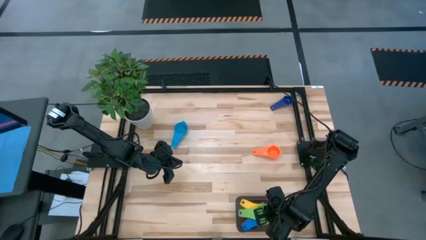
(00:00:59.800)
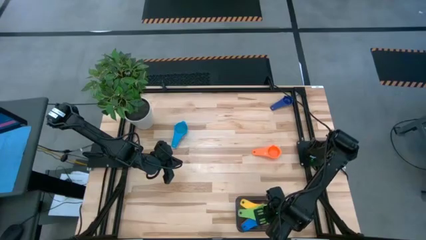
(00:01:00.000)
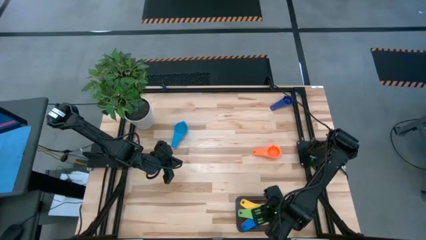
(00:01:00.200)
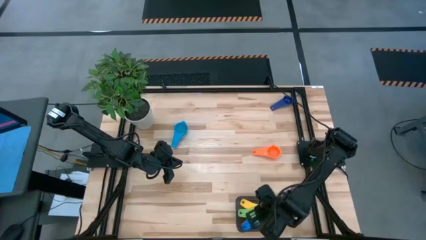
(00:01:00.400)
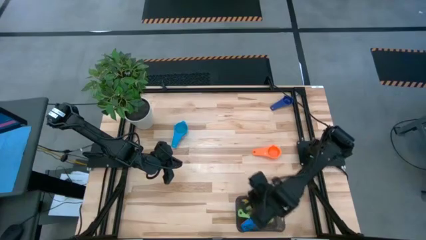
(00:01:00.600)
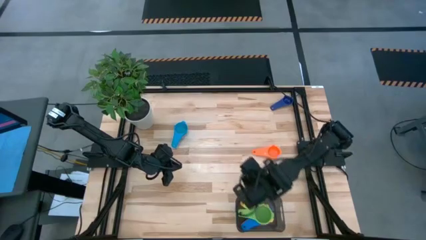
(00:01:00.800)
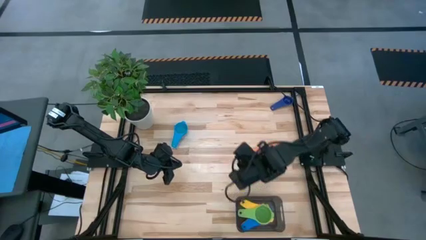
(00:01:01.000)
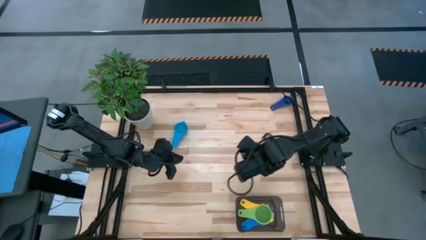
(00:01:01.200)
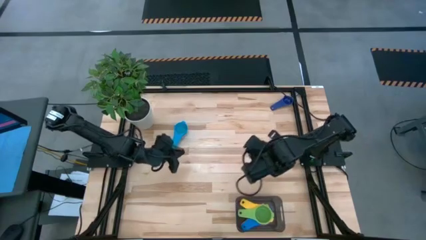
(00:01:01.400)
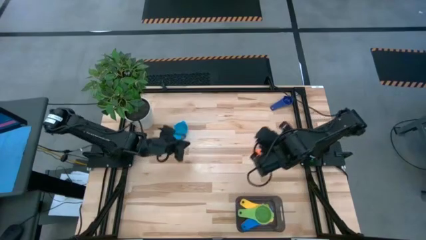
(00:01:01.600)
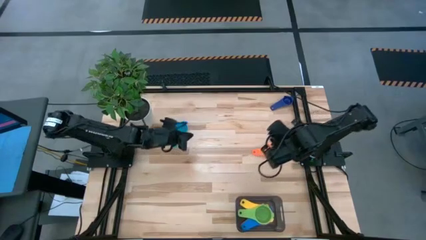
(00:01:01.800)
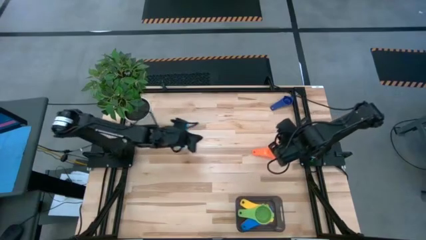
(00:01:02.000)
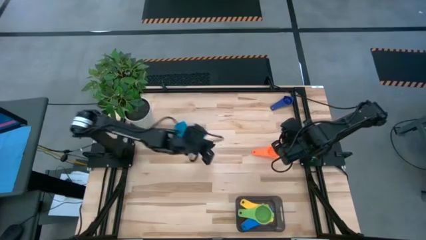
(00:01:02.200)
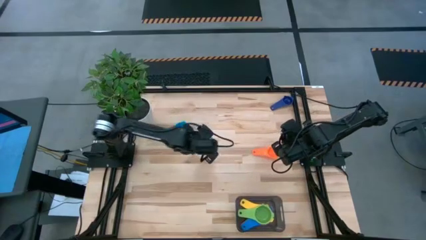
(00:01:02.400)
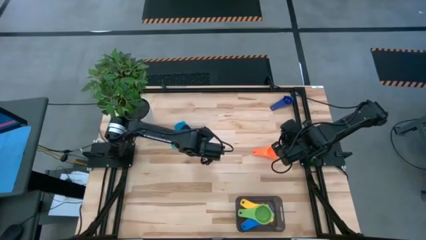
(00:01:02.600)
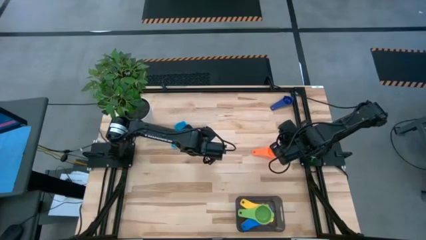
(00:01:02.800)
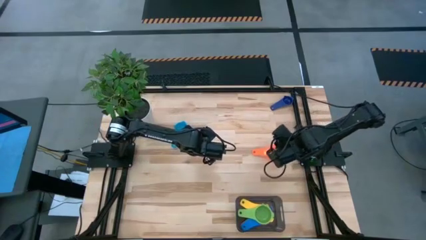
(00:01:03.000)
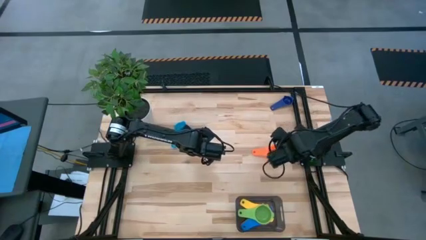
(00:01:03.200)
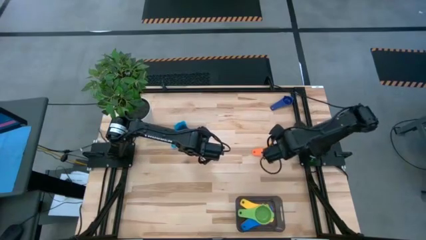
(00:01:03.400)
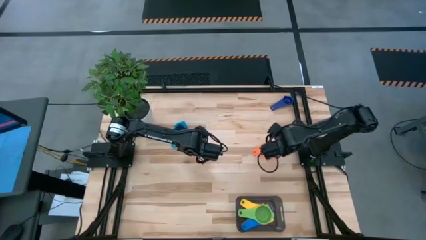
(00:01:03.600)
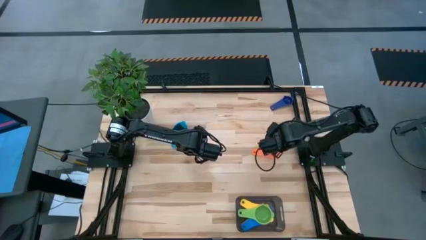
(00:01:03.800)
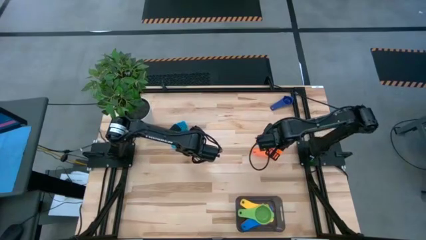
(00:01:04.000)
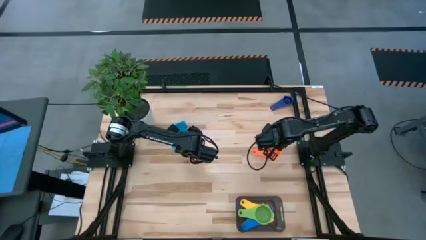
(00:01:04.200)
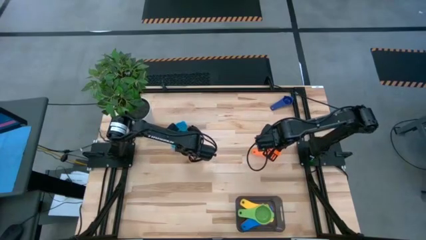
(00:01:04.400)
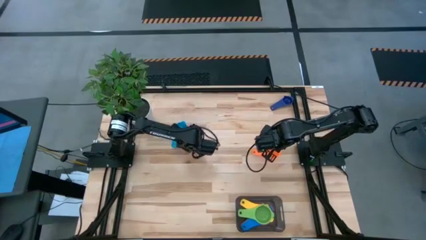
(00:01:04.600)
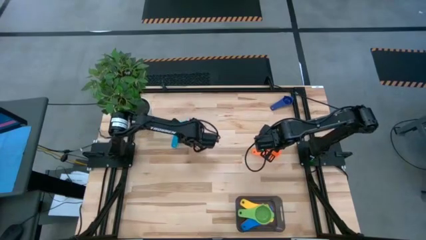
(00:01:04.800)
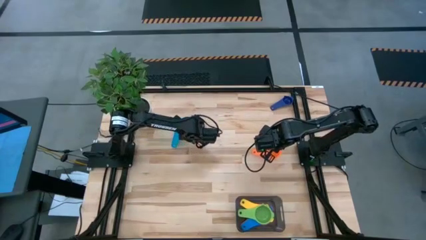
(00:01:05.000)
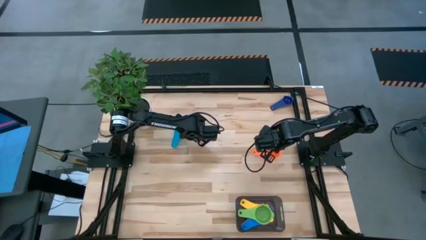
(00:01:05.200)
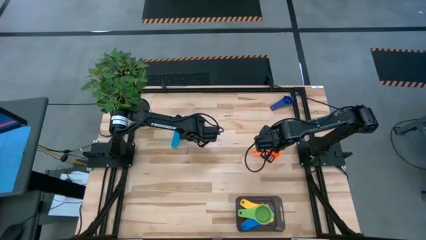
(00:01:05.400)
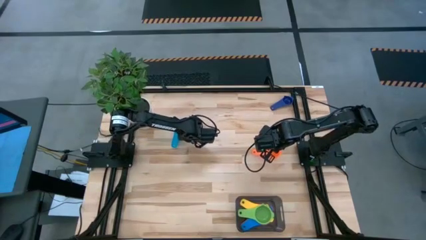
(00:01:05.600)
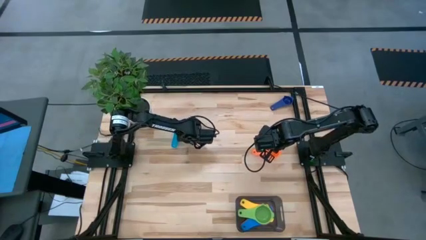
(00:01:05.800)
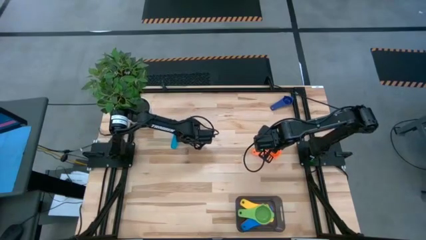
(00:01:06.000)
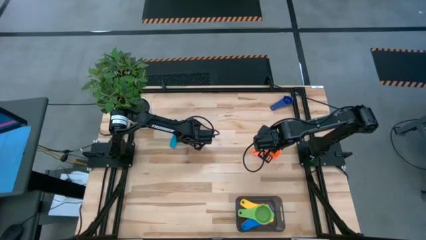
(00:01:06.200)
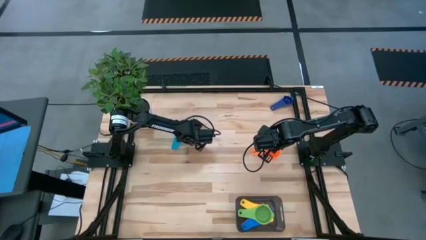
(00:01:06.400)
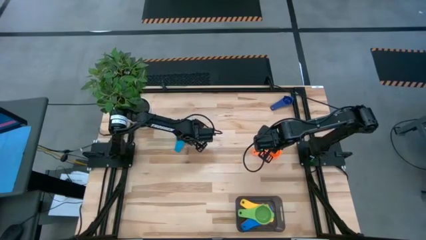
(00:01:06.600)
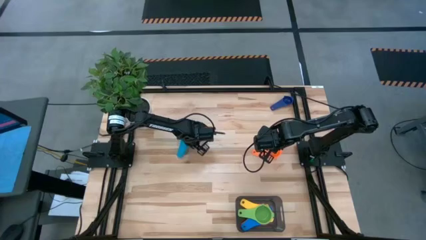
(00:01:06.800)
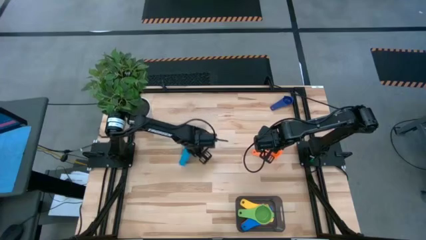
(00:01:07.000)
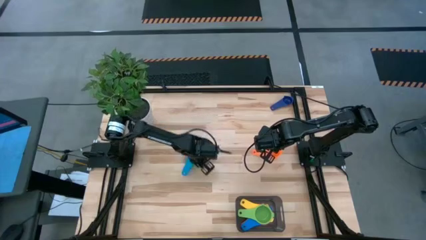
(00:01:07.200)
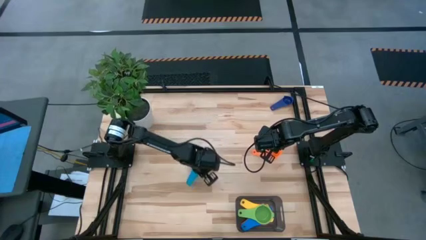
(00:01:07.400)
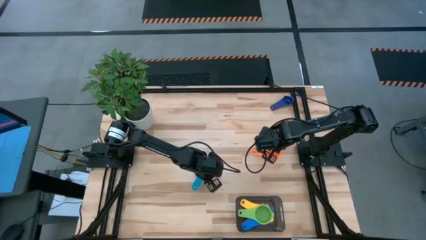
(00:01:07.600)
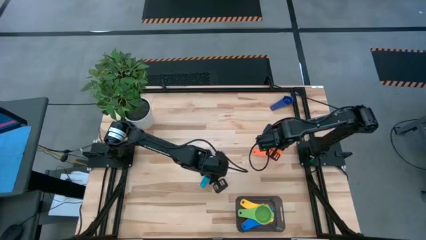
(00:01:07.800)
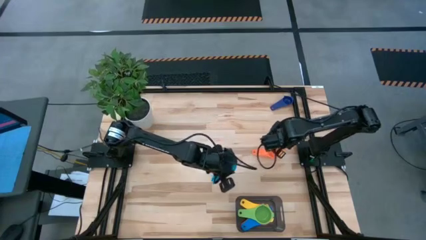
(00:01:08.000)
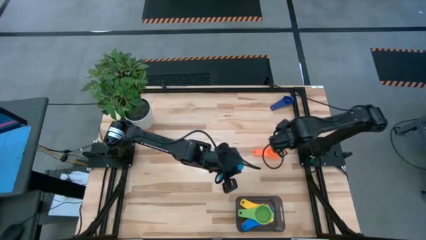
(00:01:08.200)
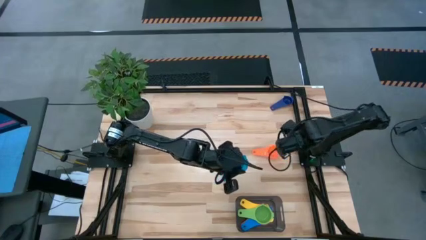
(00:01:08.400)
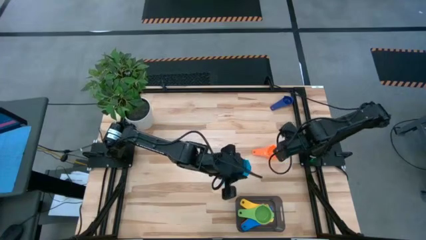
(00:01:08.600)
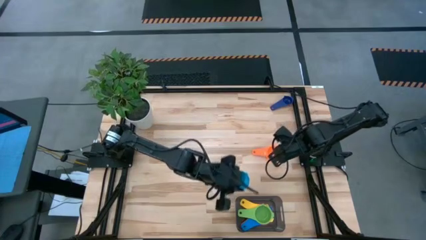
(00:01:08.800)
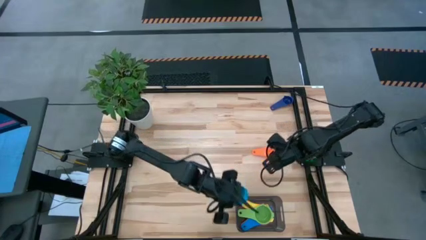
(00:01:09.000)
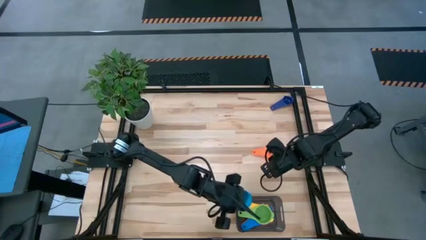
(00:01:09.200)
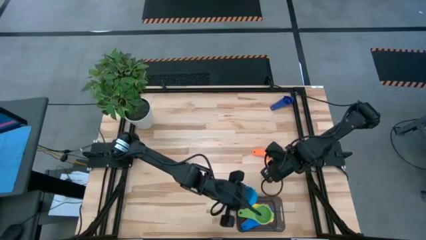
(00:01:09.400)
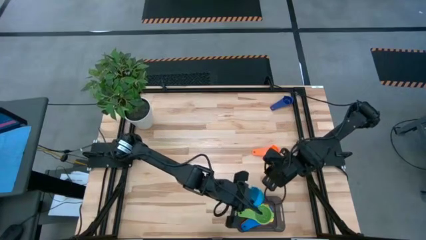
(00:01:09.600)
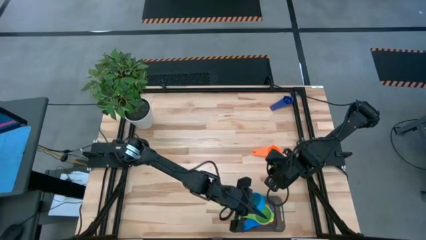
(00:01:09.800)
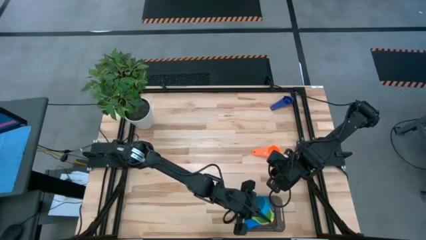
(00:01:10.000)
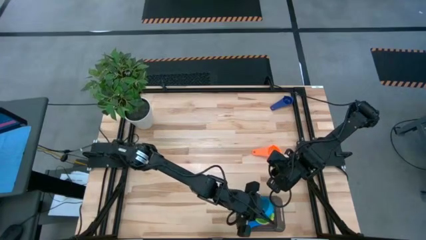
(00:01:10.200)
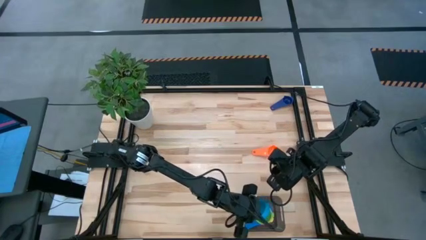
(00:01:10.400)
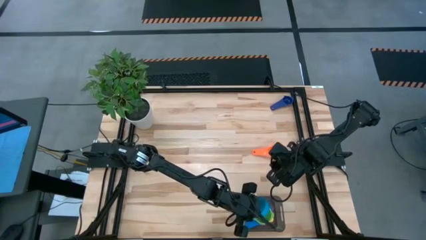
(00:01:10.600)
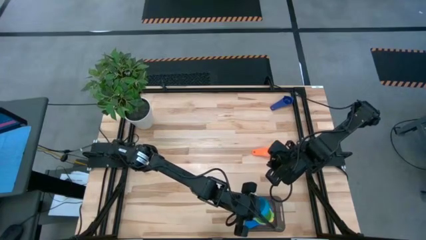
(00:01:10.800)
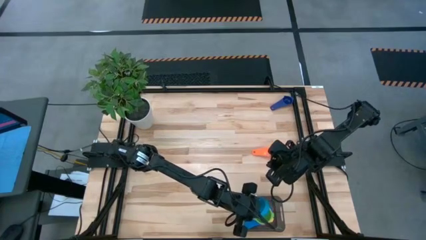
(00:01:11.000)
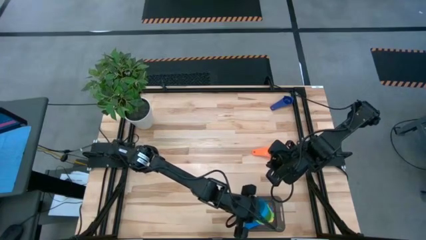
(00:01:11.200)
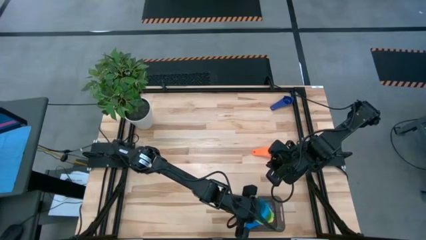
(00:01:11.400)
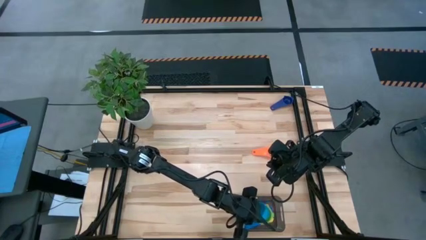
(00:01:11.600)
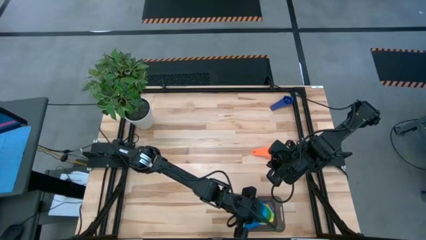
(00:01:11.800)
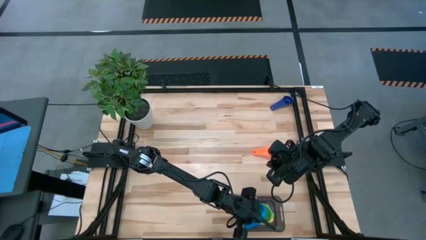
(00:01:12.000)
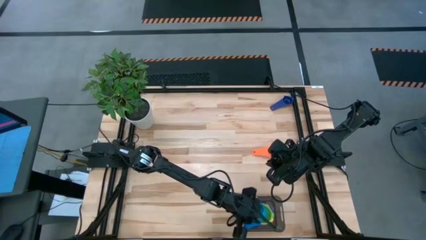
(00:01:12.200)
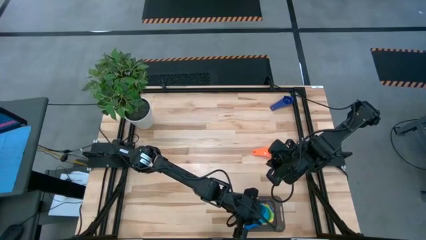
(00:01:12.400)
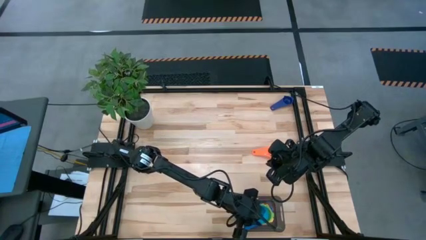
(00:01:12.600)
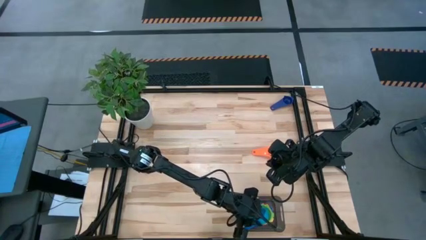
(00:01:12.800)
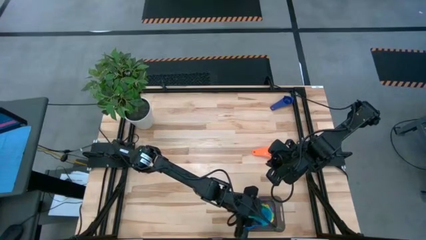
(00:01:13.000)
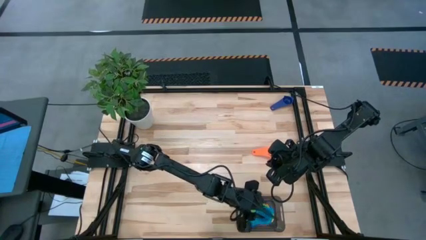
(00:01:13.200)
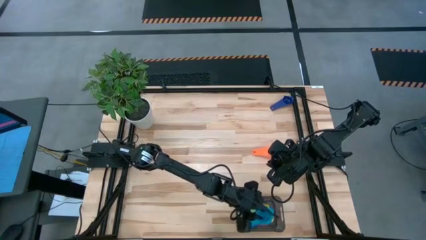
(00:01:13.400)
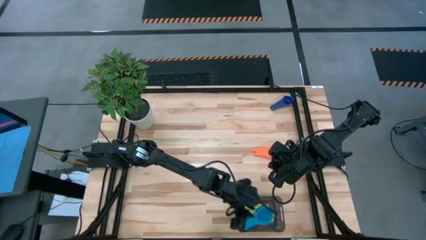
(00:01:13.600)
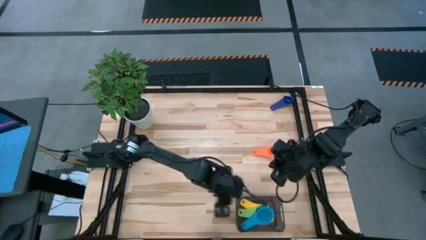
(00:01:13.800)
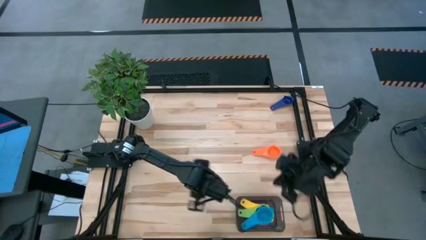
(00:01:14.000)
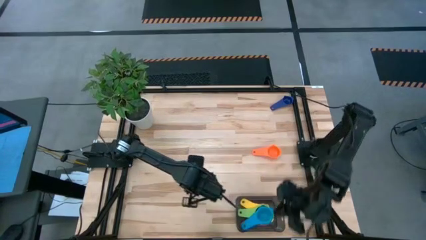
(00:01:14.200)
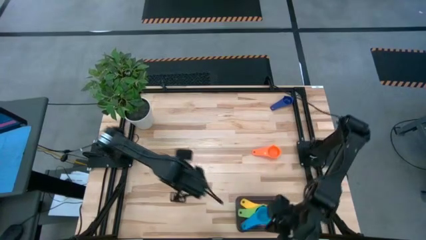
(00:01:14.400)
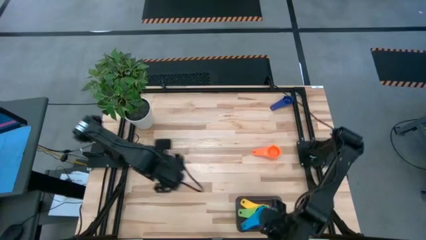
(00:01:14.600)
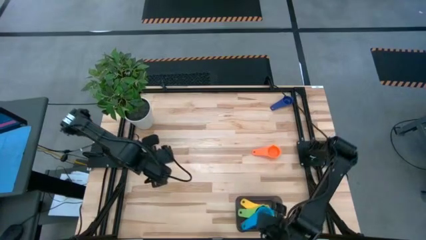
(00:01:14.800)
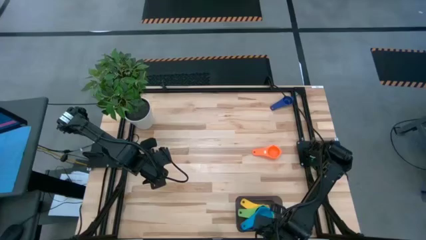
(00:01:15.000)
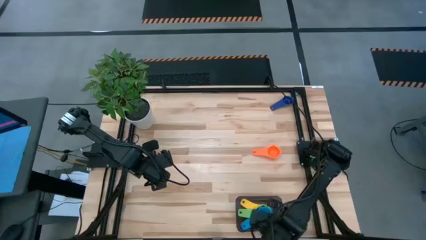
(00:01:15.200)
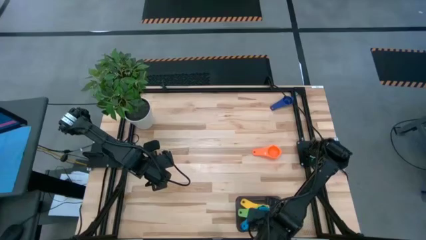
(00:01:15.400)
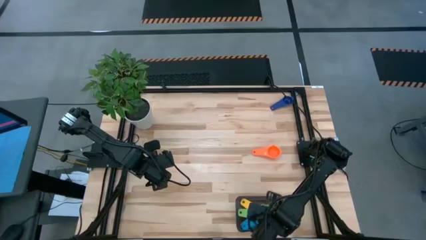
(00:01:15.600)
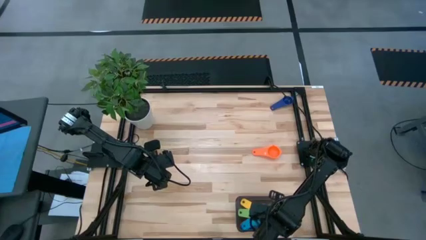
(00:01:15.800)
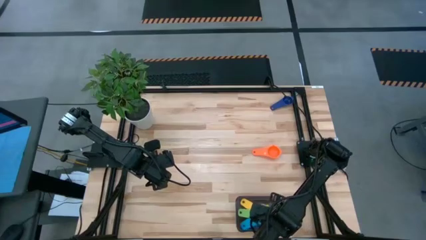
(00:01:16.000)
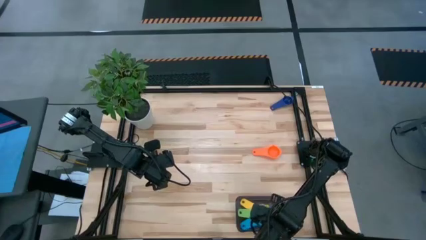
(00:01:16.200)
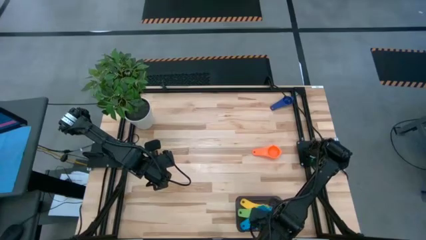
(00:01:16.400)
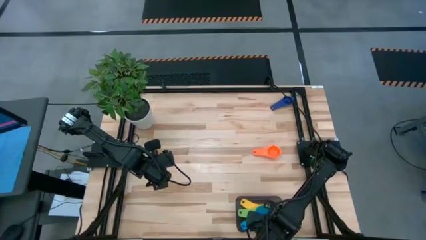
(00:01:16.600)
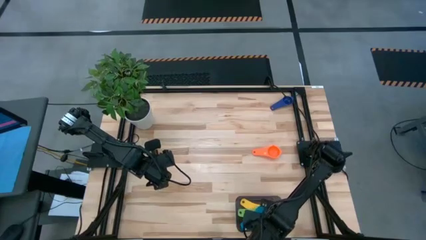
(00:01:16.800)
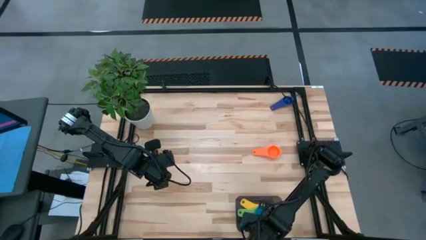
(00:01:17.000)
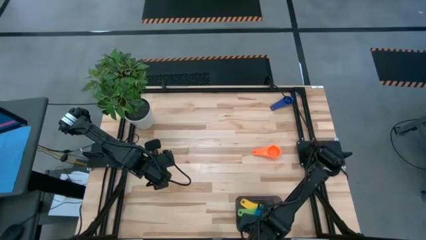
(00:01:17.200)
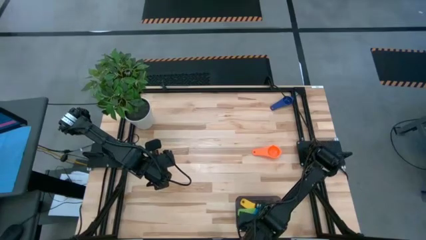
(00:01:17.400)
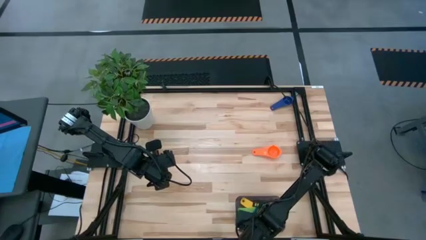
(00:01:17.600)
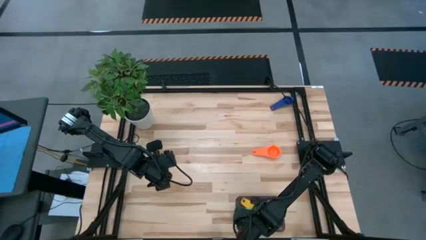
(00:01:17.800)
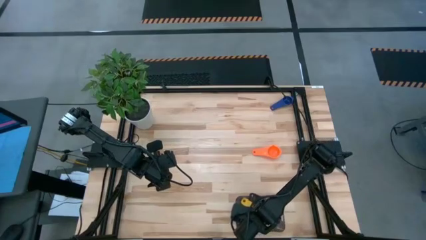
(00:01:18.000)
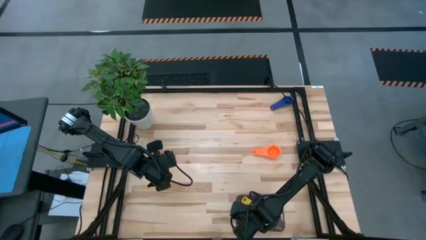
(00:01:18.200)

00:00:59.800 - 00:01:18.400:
Task: Nest measuring cups in basket
Stack the light blue measuring cup on top of the green measuring cup in the black bin
